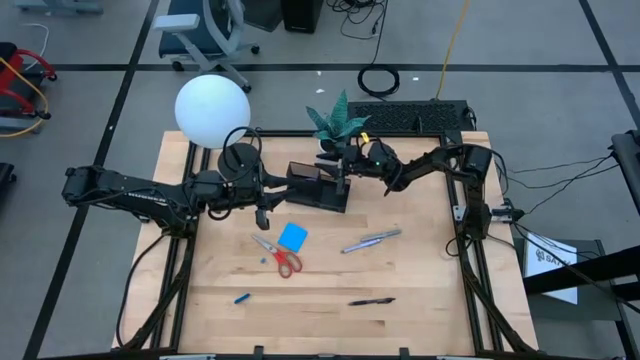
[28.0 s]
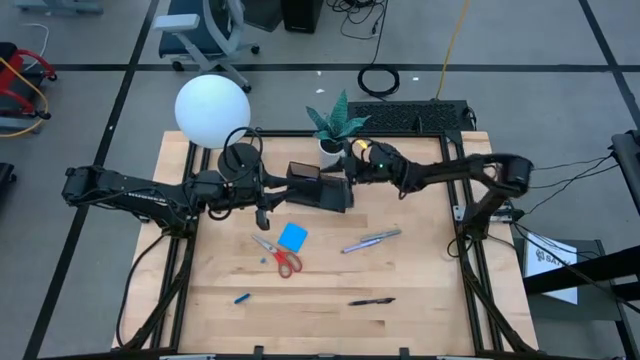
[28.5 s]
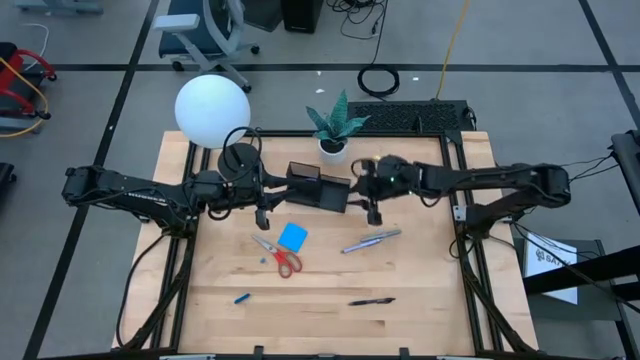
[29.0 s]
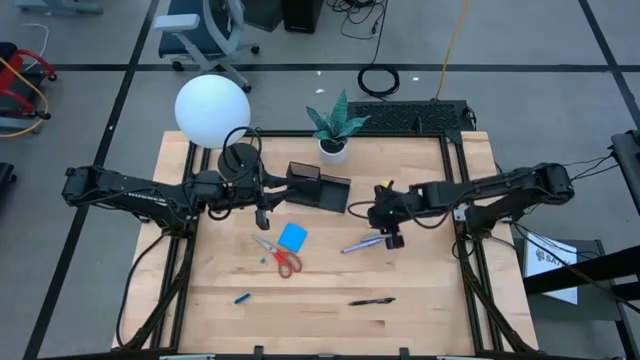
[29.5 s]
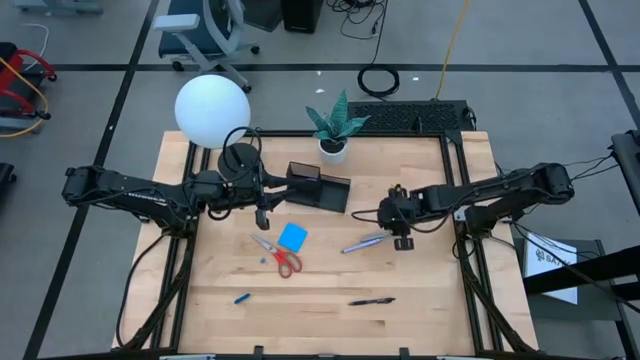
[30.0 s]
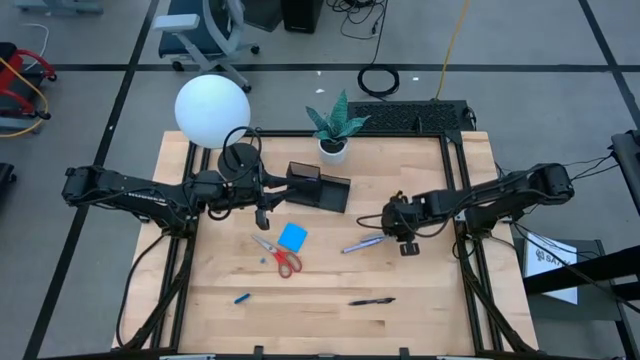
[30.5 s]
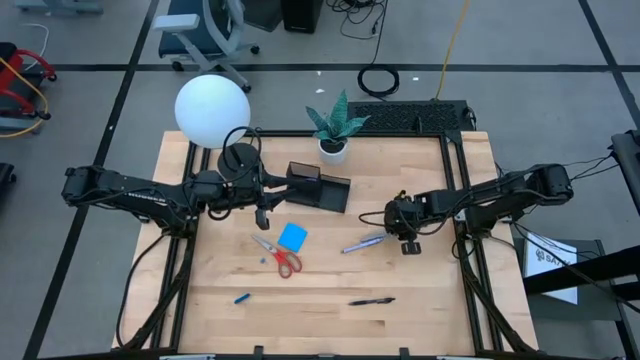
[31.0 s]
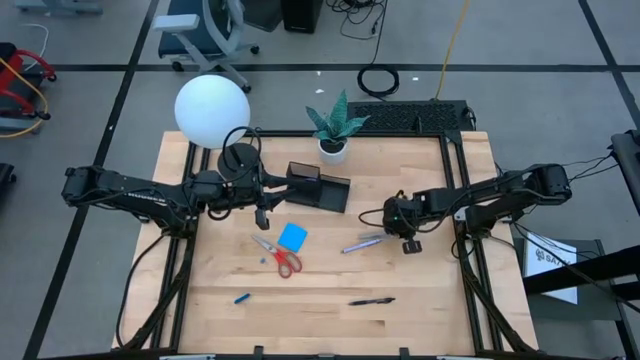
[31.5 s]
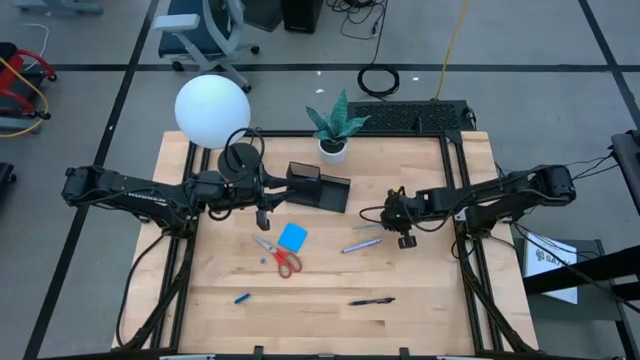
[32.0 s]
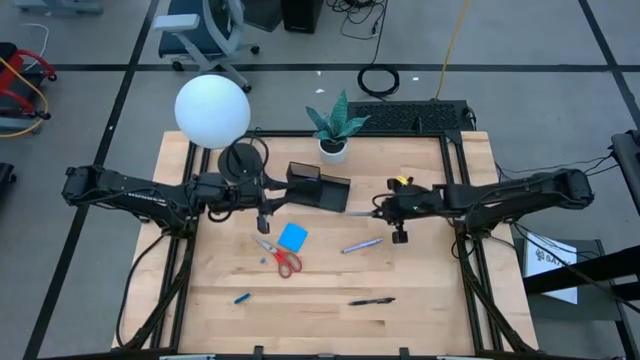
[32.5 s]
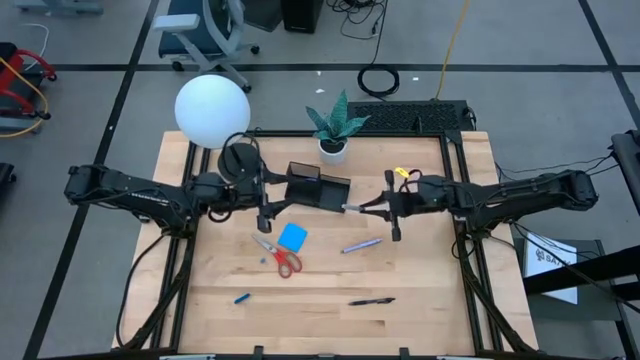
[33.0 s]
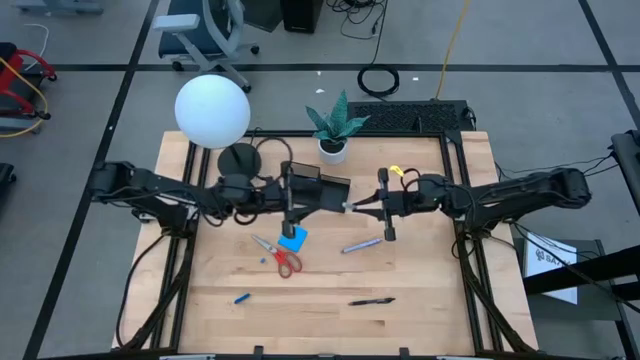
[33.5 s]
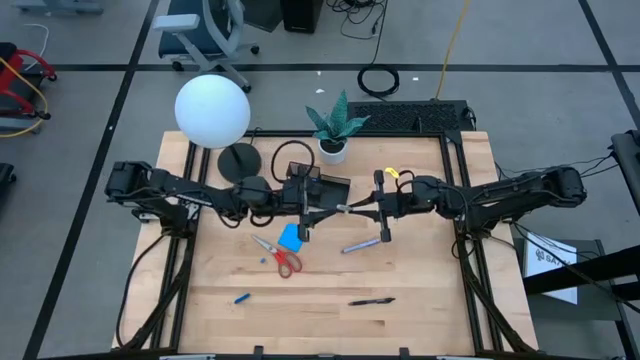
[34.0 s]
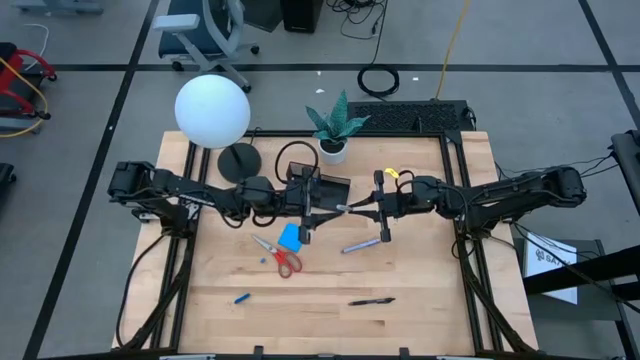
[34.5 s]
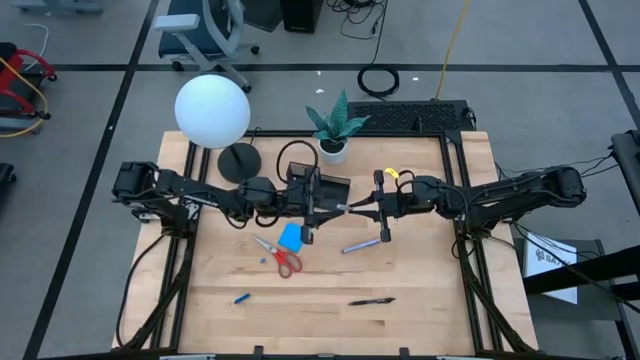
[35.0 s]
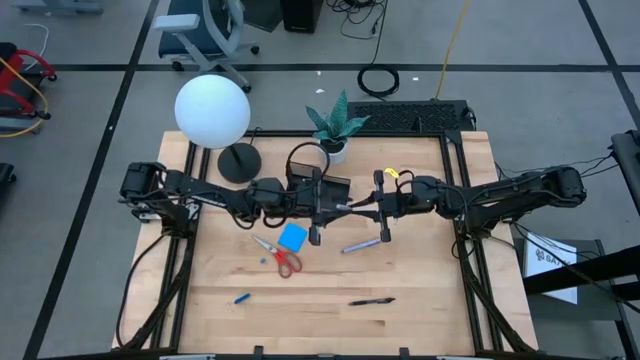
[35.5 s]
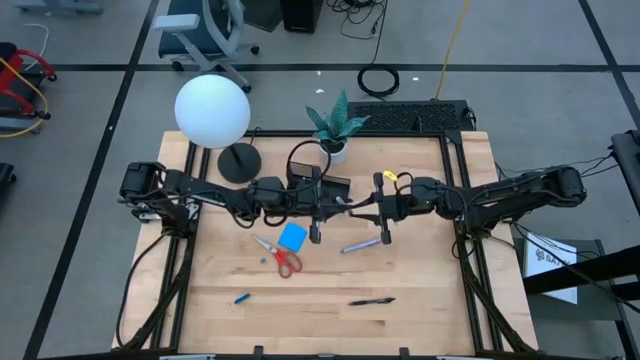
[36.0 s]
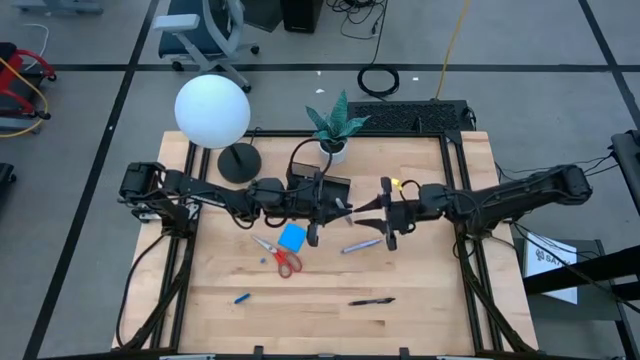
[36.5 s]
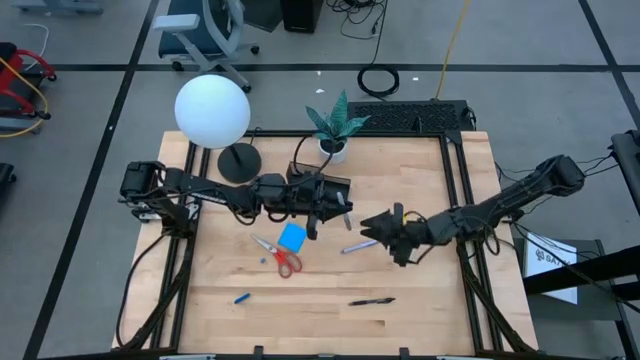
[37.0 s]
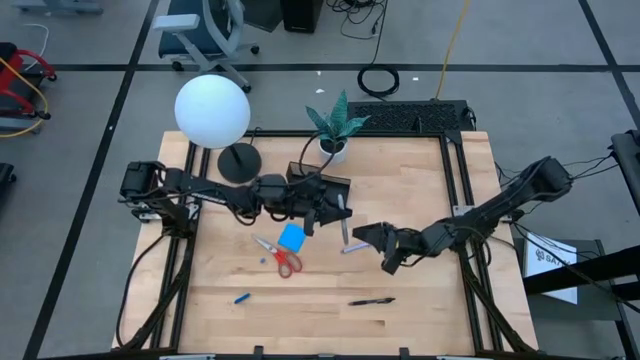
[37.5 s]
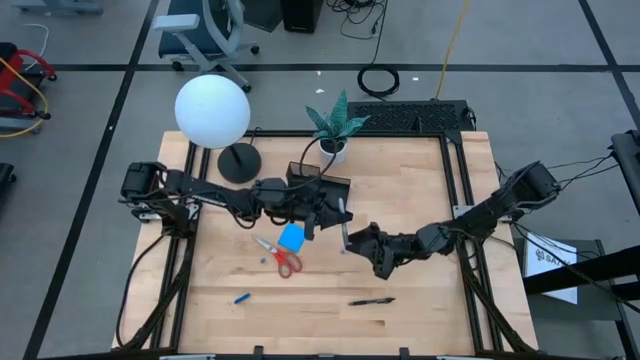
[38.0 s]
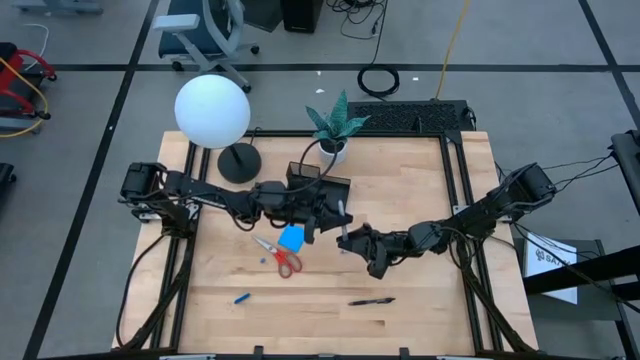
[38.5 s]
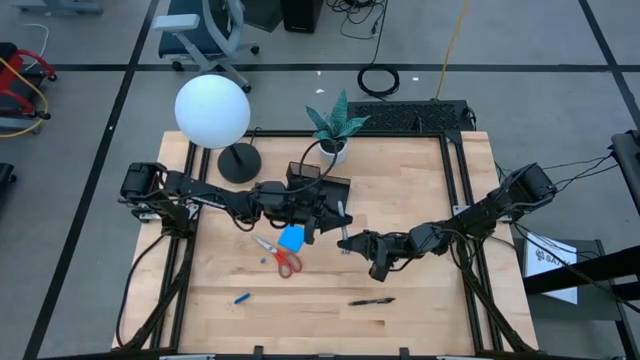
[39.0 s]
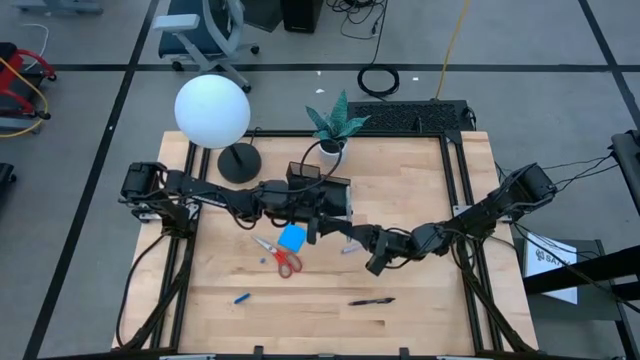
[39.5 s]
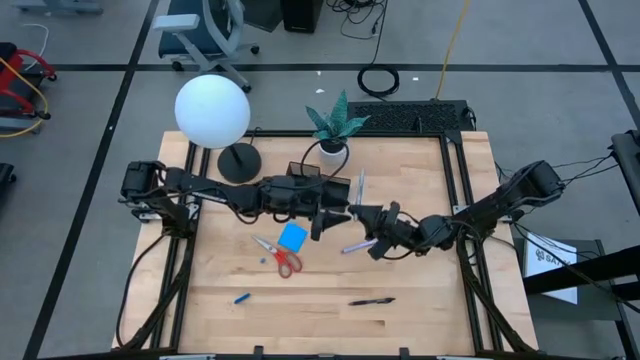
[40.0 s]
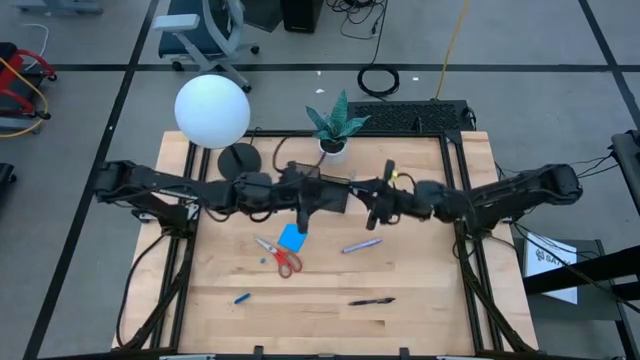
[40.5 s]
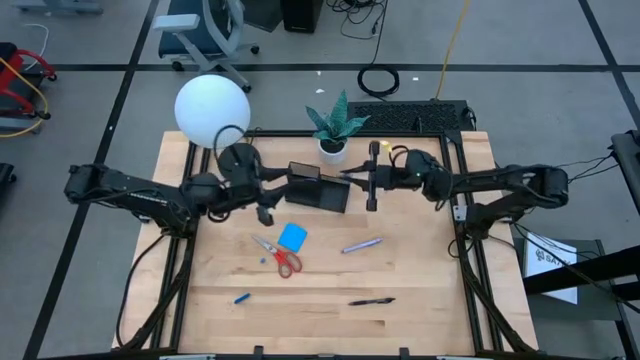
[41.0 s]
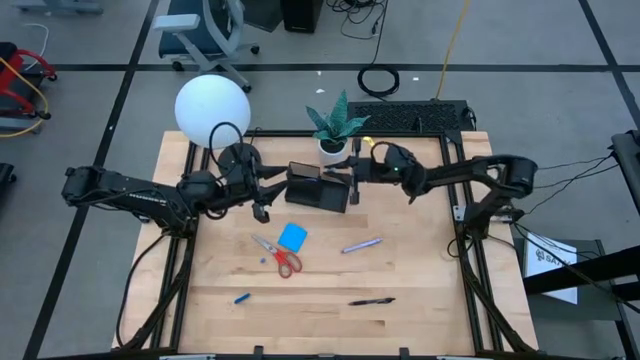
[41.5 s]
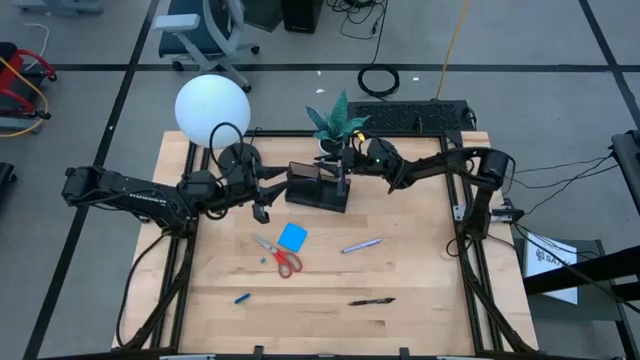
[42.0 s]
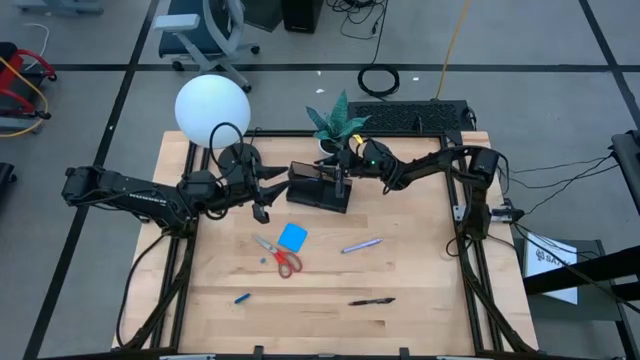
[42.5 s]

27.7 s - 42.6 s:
Task: Pick and place office supplies into organizer
Put the gray pen into the desk organizer

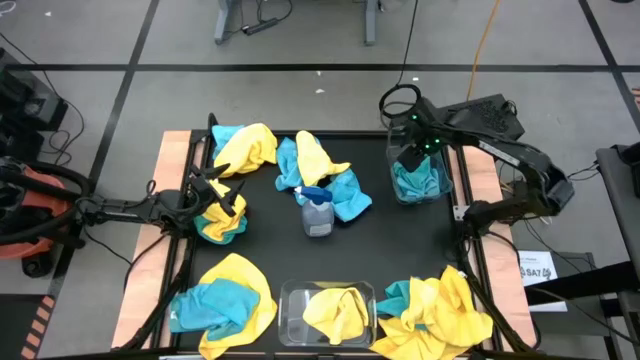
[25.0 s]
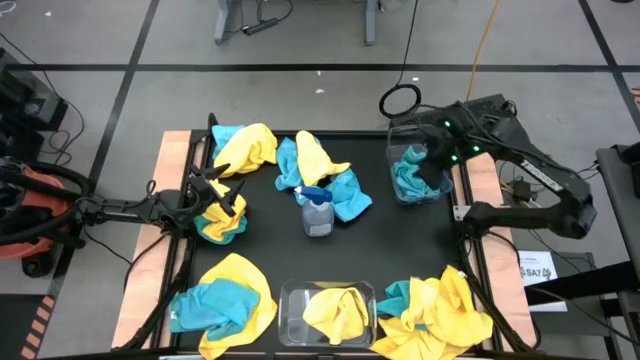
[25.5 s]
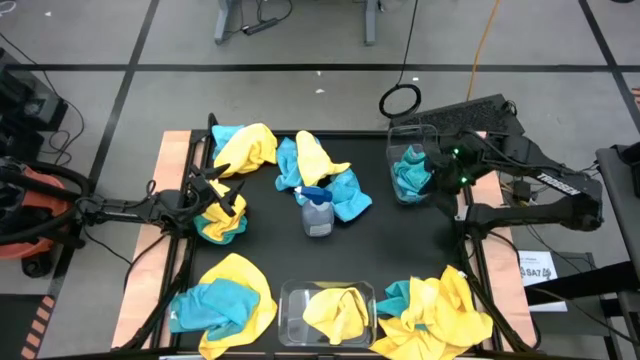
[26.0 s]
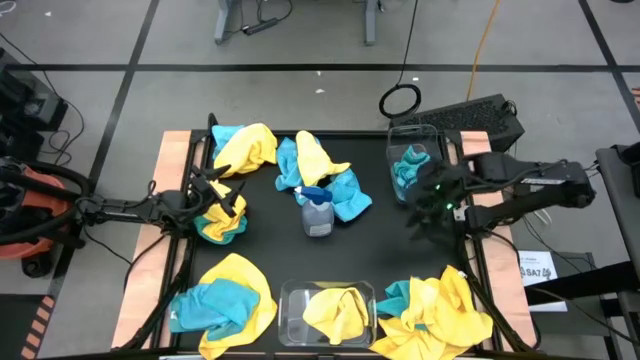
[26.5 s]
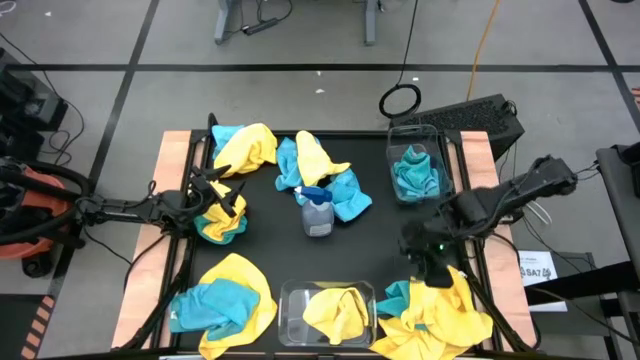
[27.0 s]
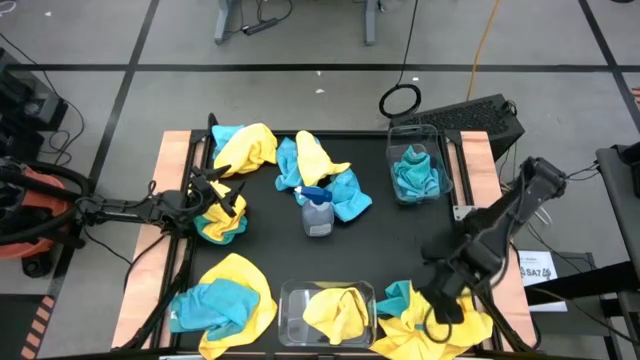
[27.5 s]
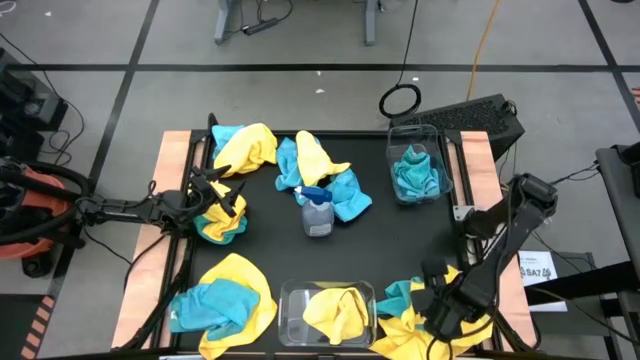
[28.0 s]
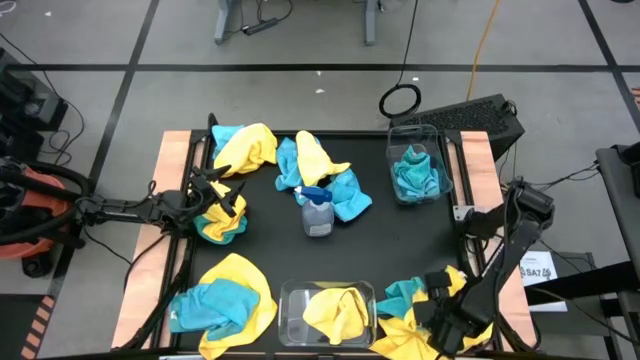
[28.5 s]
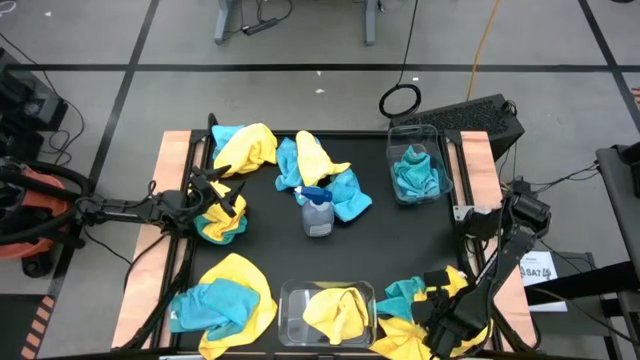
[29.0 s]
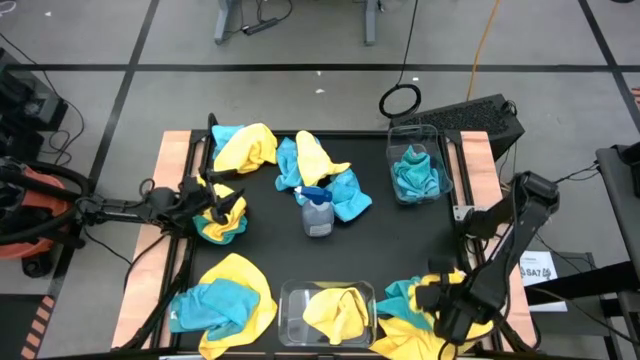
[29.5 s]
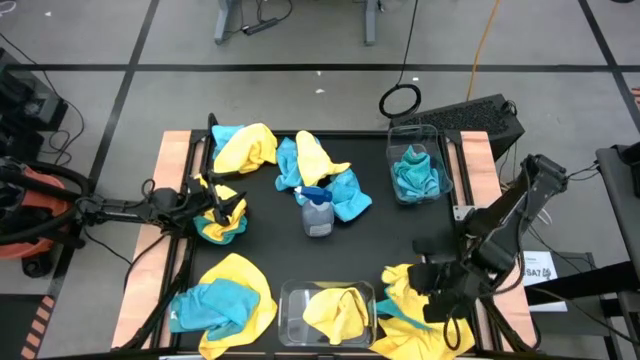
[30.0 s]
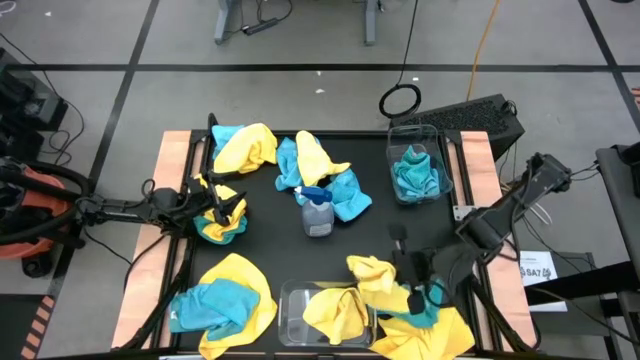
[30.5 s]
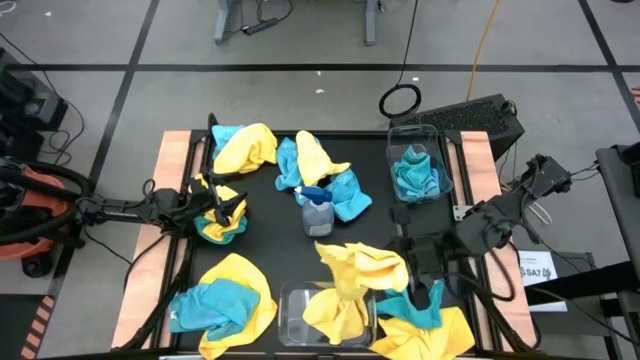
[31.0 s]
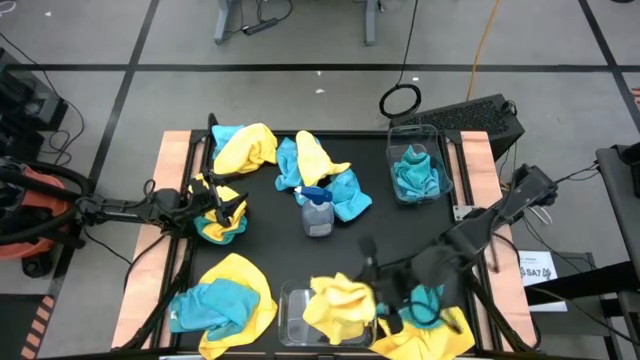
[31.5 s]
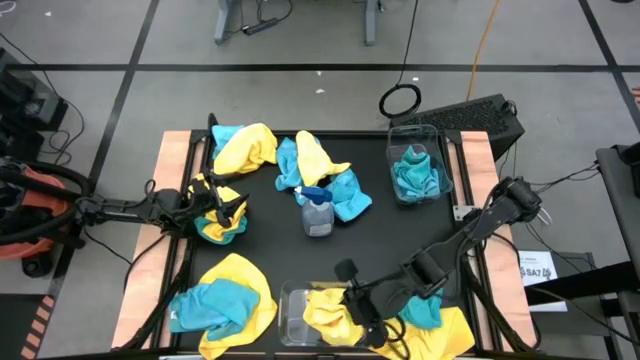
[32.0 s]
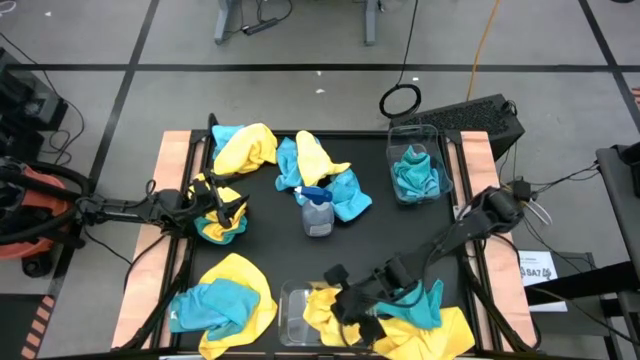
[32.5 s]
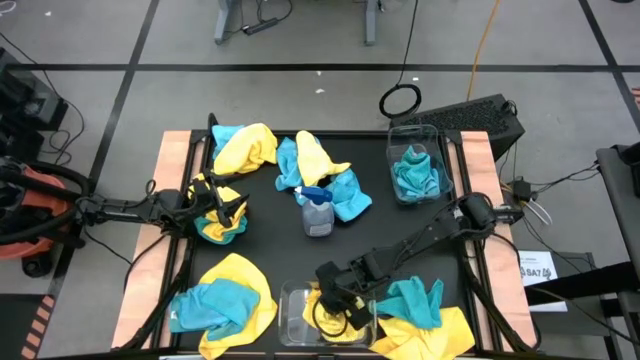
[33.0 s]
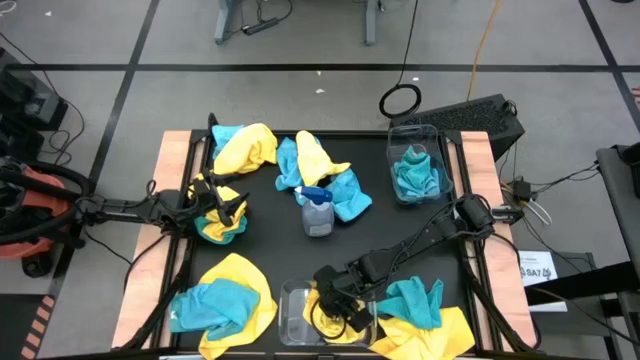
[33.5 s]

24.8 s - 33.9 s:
Task: Sort microfiber towel by color & place in baskets
Put the yellow towel into the bottom transparent bin
